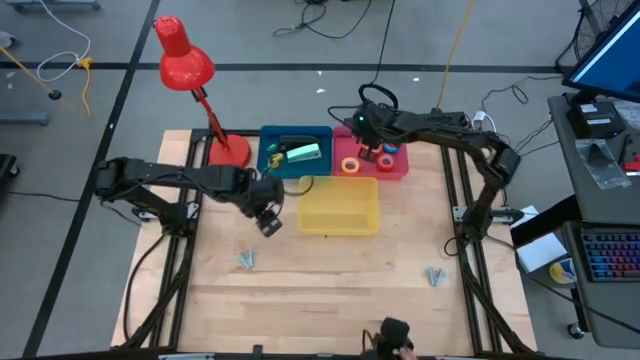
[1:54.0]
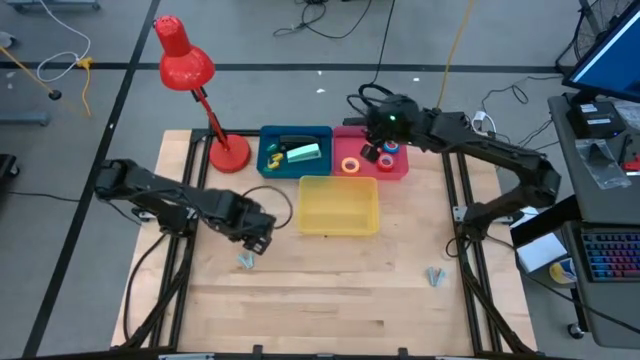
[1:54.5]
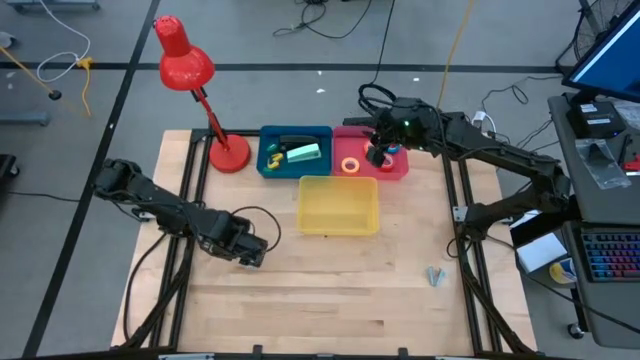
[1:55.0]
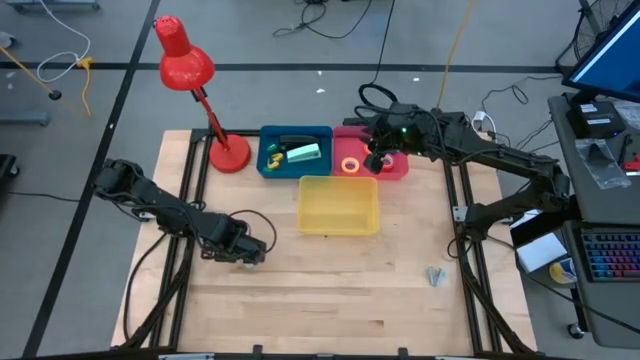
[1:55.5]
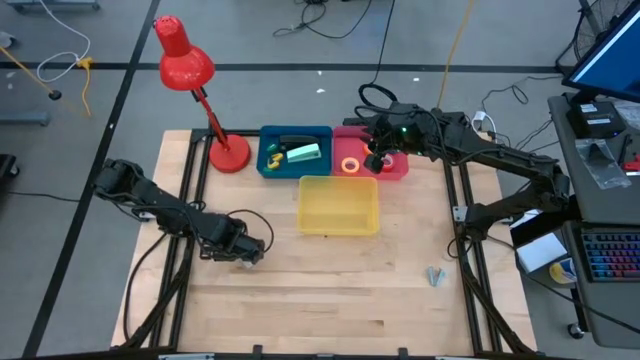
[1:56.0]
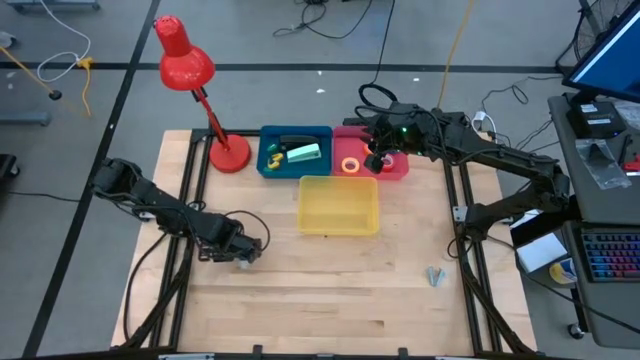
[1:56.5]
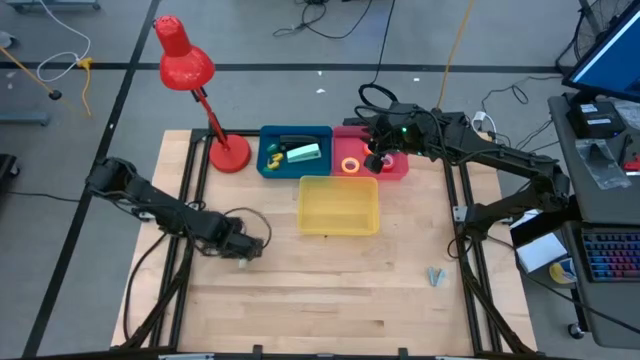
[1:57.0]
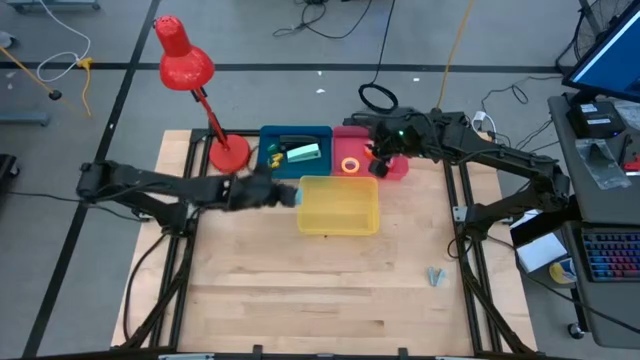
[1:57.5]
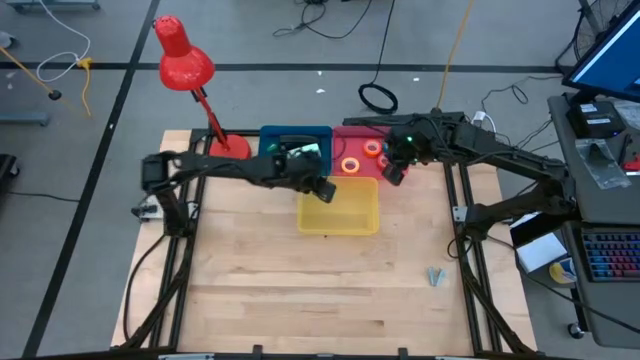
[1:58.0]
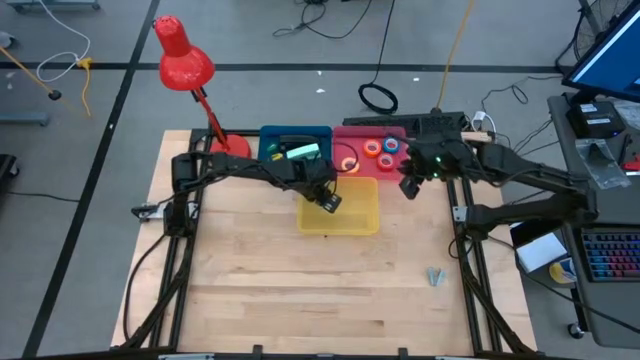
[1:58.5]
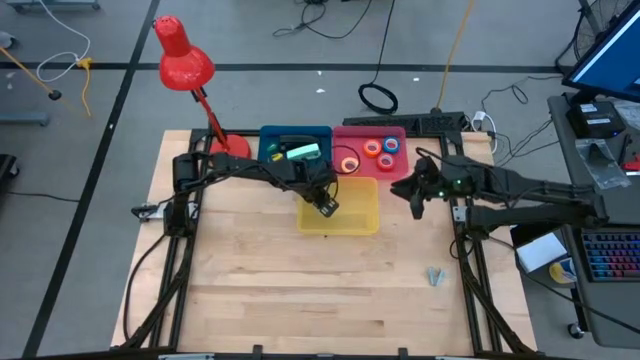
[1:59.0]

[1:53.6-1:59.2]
Task: Pick and place Stapler, Stapler remover, tape
Put the left light blue staple remover into the yellow bin

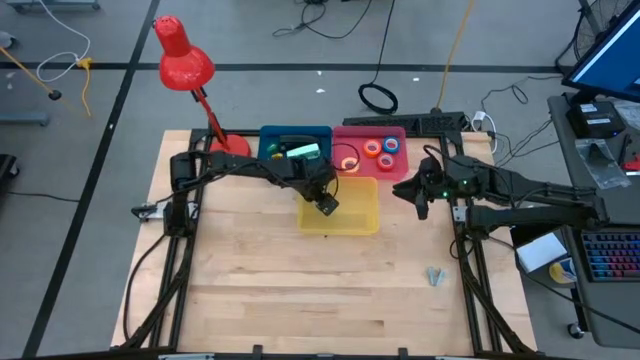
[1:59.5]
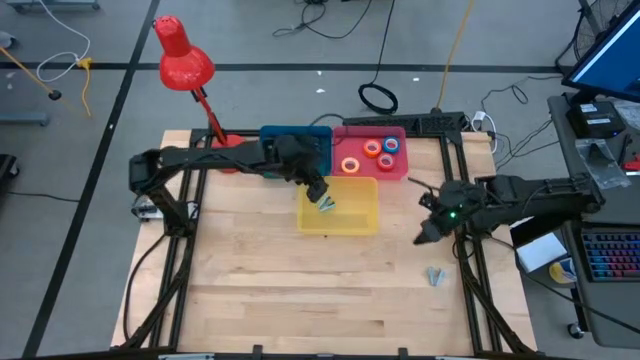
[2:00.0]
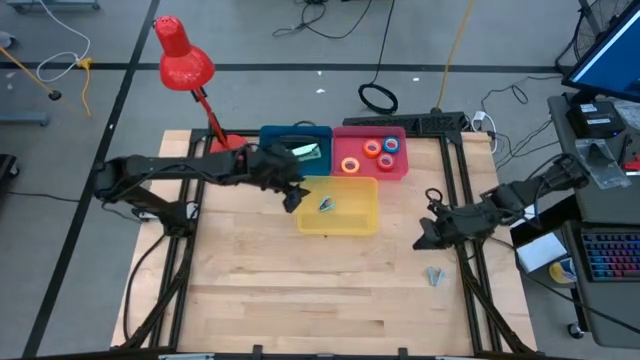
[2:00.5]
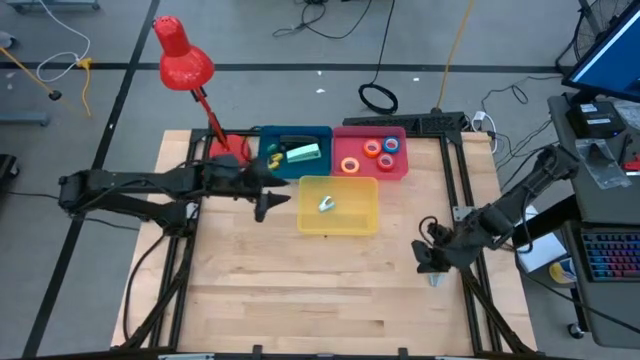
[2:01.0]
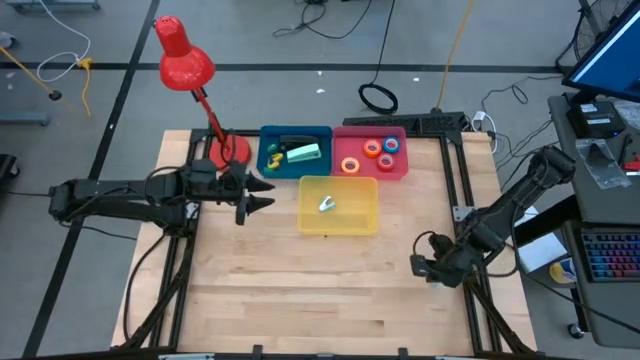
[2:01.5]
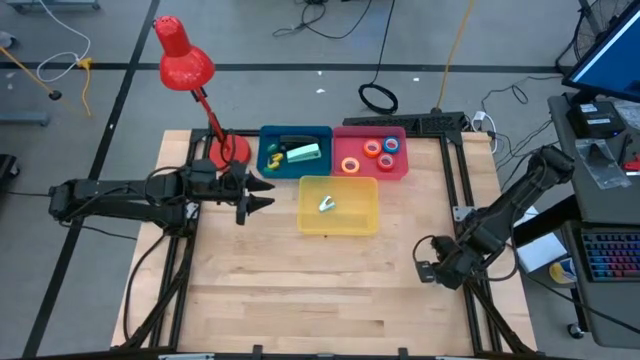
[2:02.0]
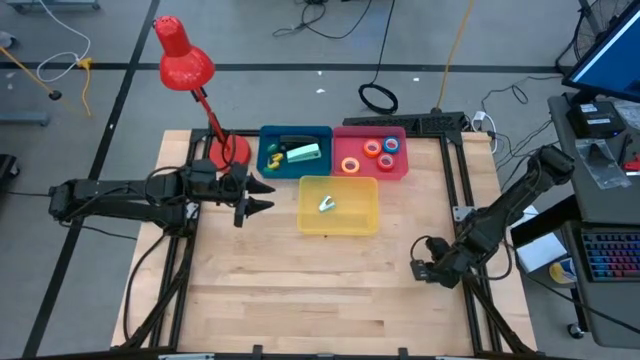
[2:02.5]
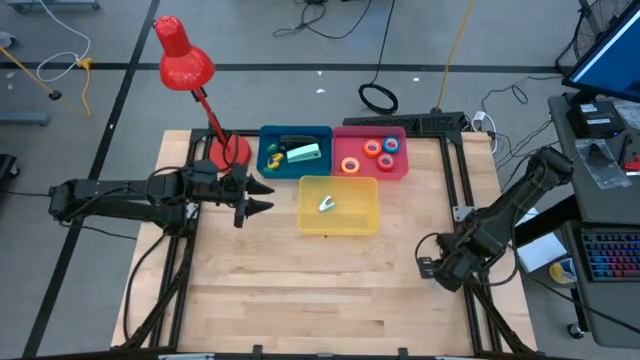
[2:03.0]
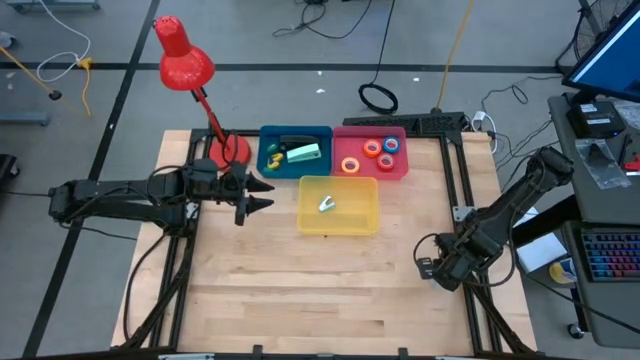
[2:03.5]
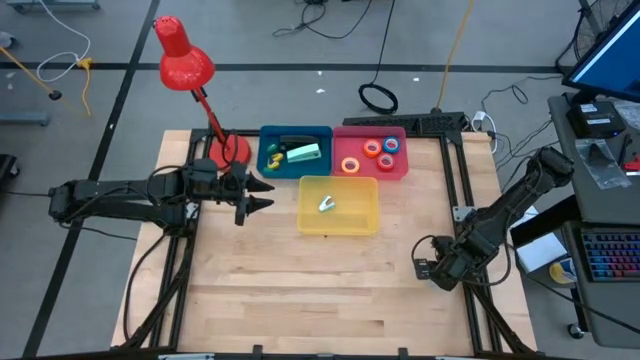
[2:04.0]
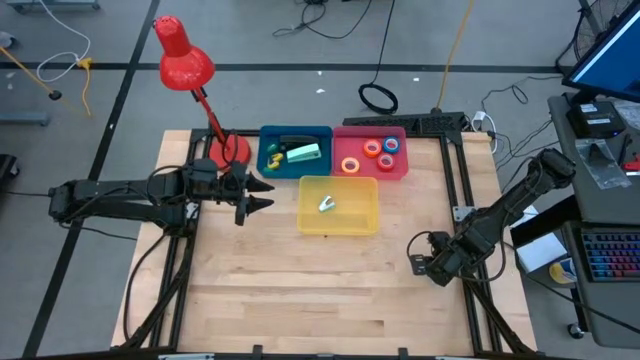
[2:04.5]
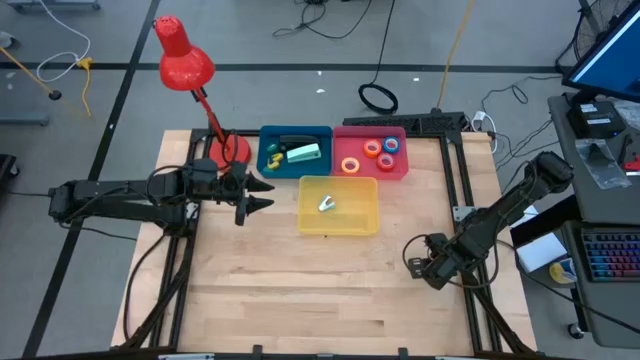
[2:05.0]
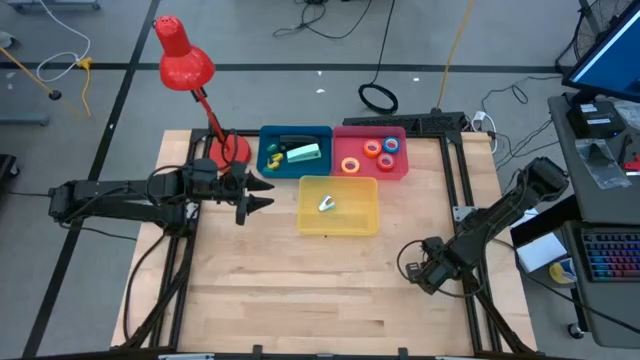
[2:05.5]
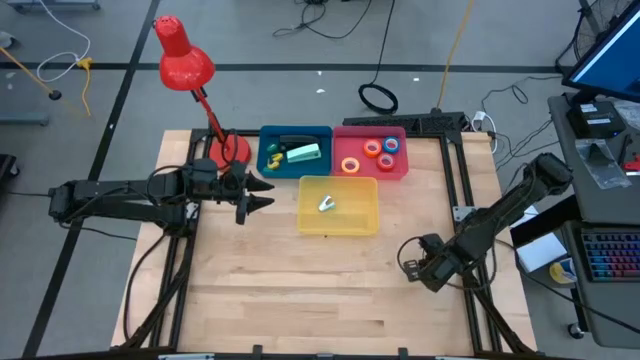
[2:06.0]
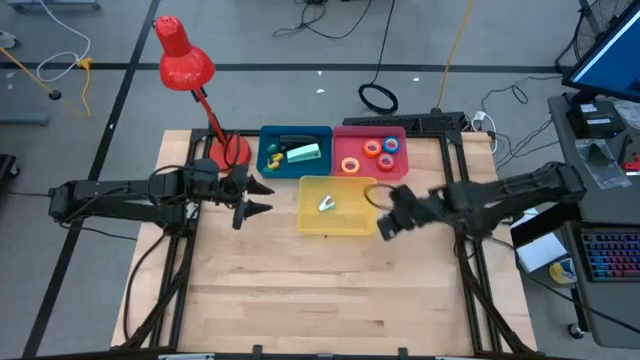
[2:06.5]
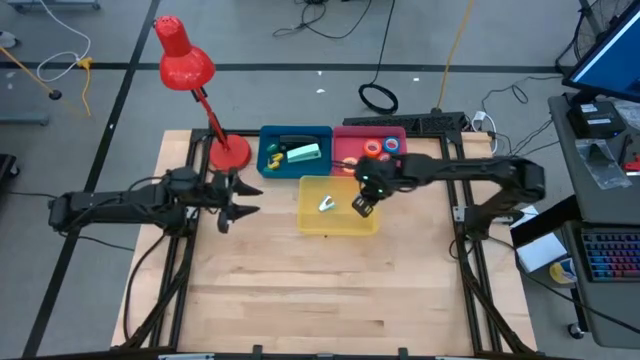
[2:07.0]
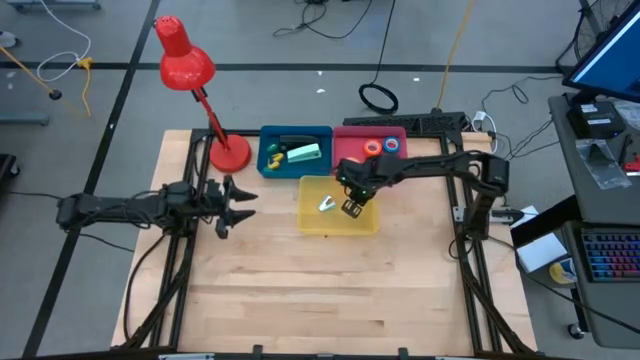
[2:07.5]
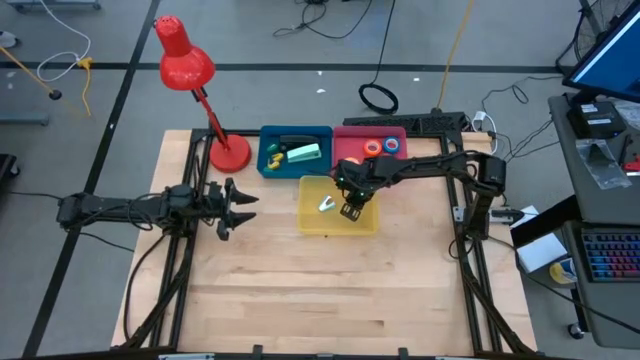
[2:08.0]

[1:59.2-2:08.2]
Put the light blue staple remover into the yellow bin

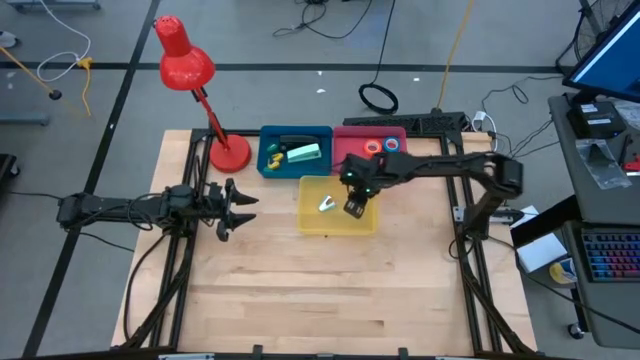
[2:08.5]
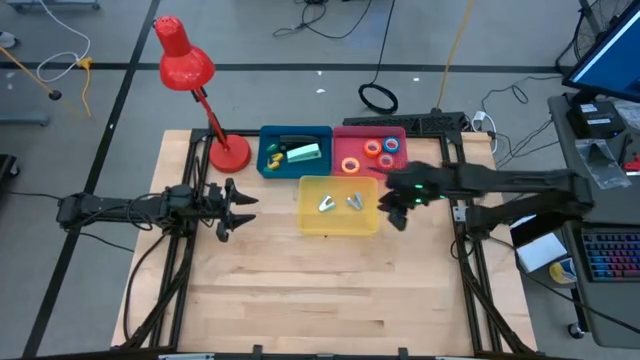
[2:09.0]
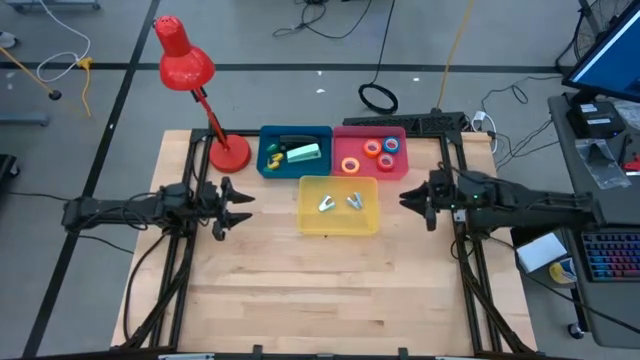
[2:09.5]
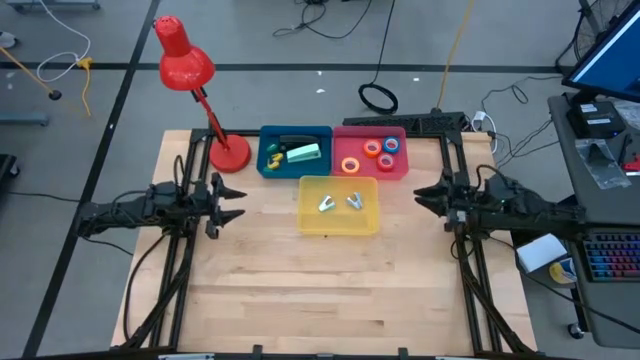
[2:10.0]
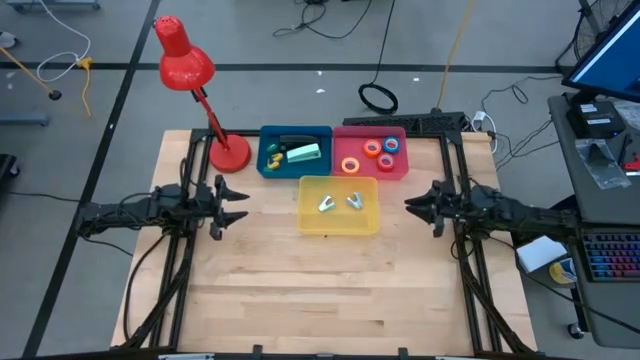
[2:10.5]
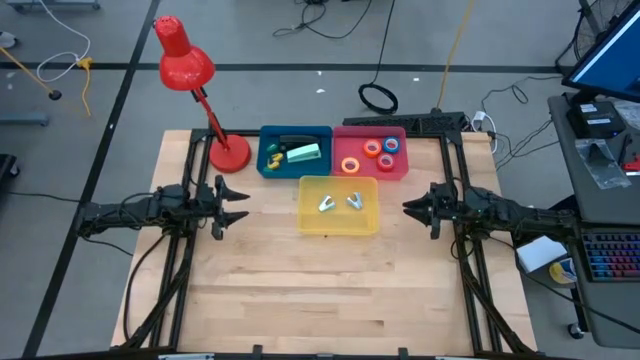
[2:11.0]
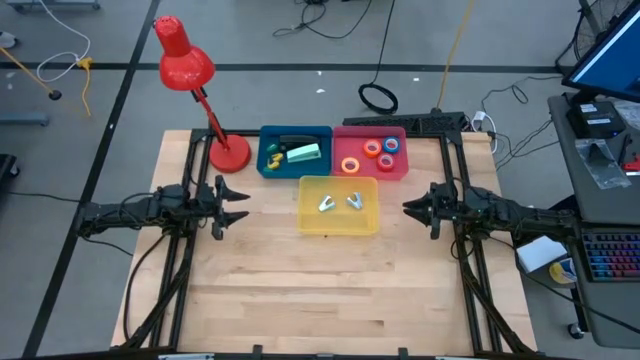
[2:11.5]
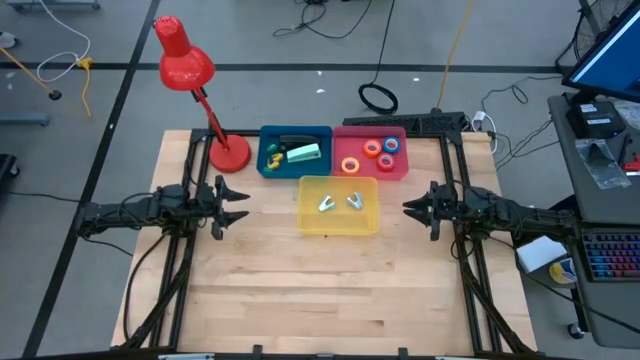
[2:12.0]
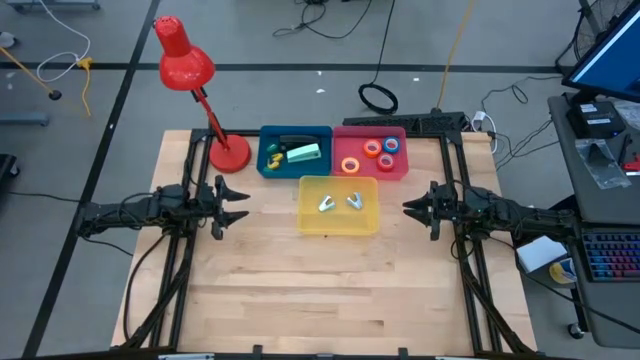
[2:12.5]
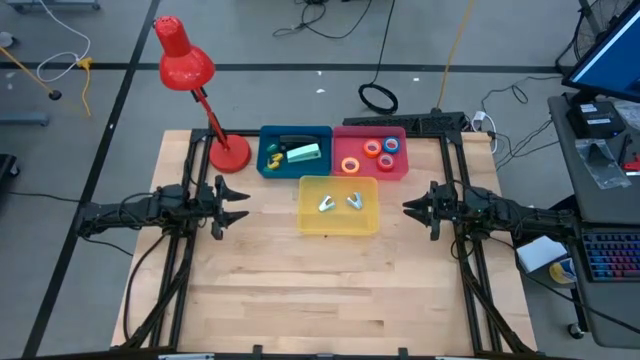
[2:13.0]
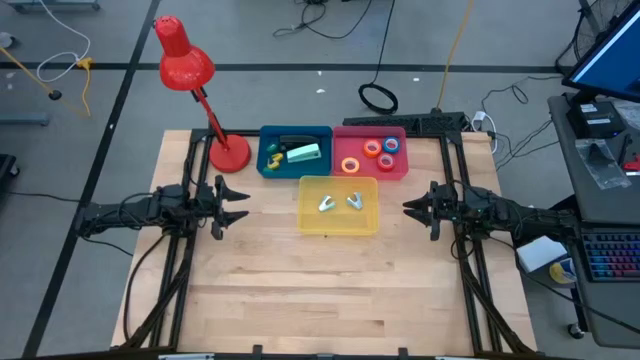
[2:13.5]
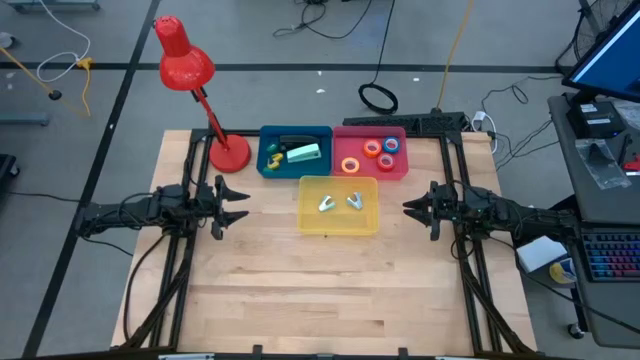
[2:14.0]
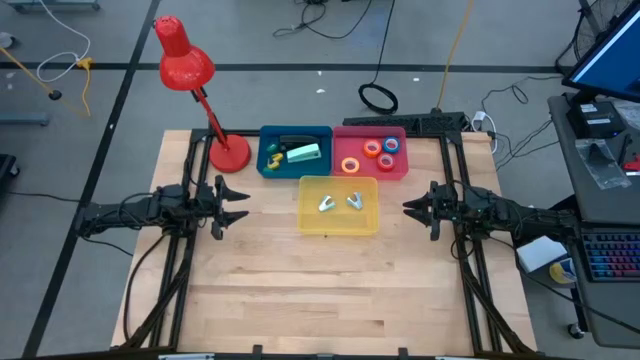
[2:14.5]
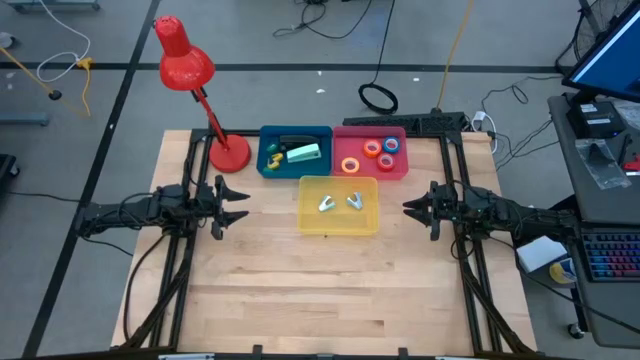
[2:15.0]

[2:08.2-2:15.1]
Return to Home Position

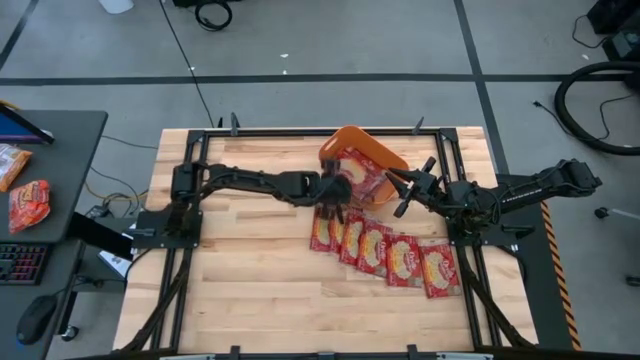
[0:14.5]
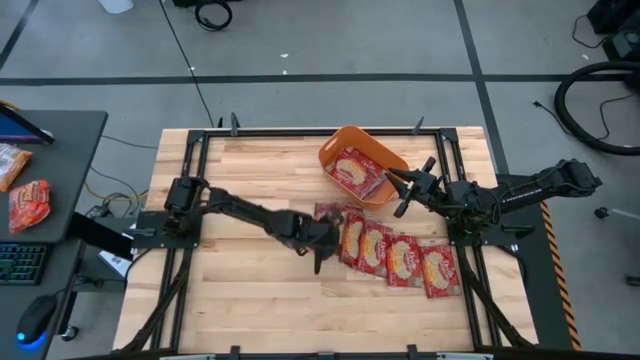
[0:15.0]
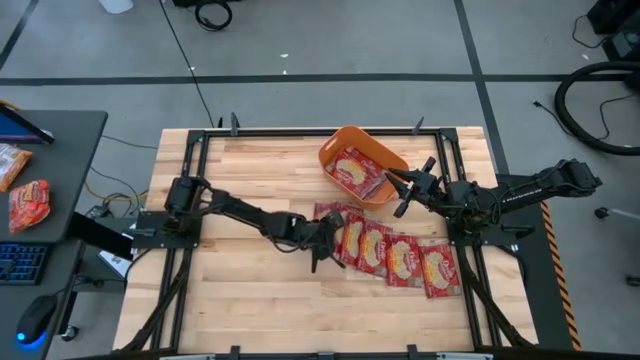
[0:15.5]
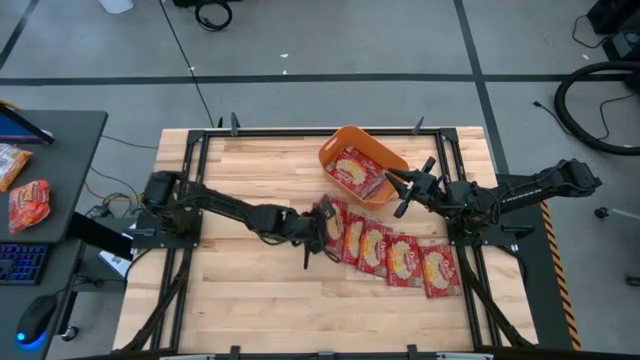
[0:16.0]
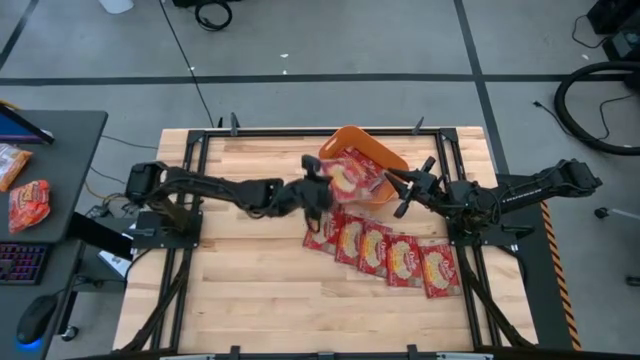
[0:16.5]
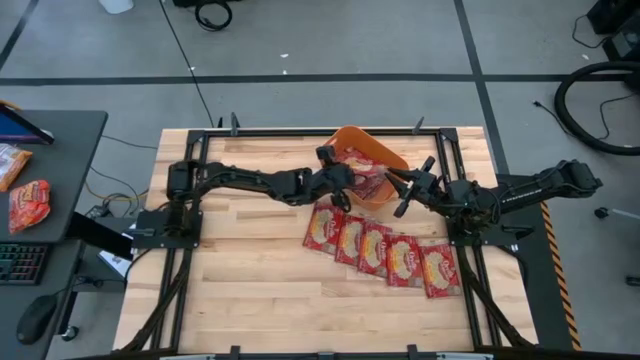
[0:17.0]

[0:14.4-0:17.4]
Task: Sort popcorn bags into baskets
Put the popcorn bag into the bin
